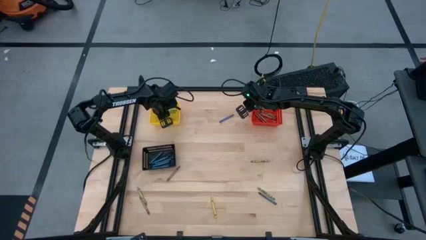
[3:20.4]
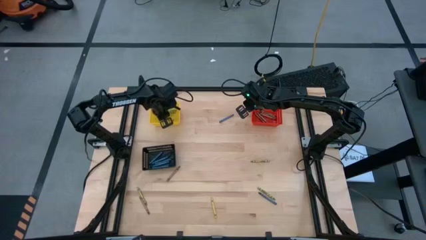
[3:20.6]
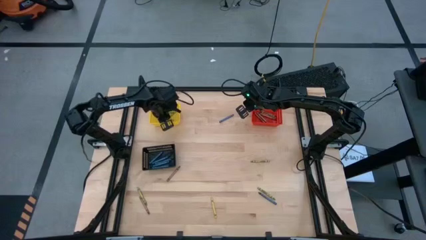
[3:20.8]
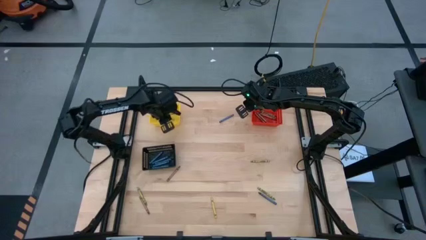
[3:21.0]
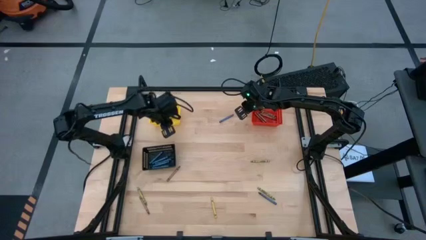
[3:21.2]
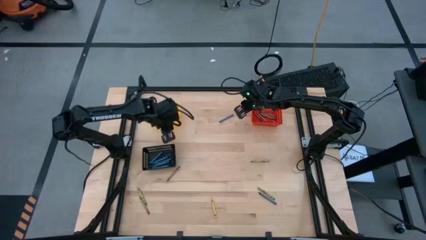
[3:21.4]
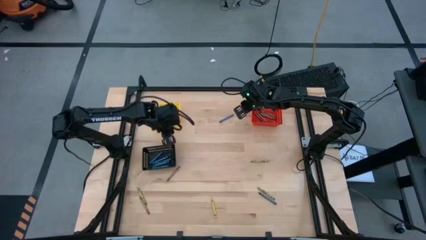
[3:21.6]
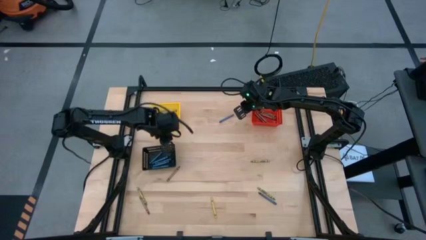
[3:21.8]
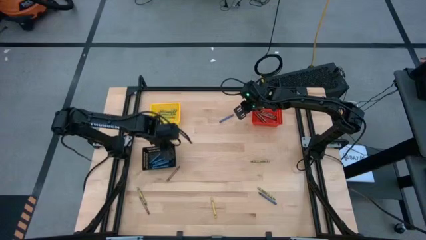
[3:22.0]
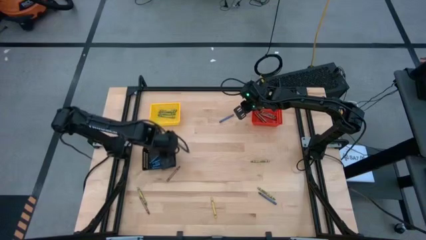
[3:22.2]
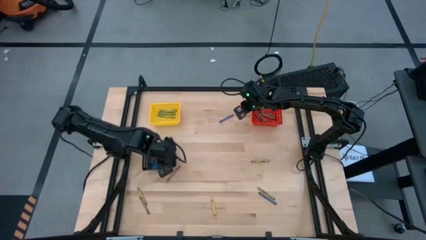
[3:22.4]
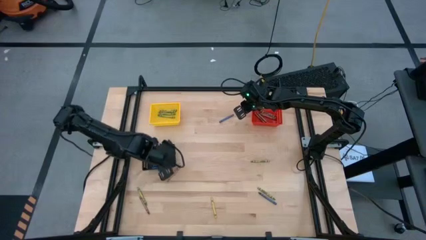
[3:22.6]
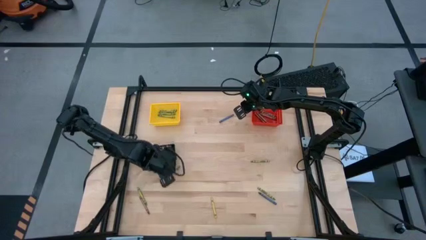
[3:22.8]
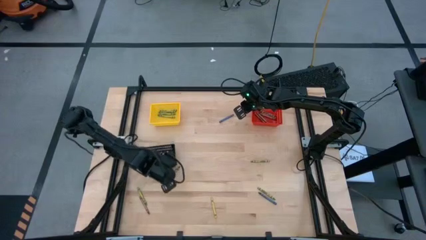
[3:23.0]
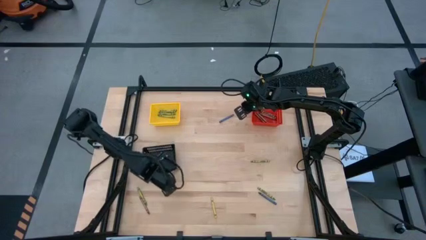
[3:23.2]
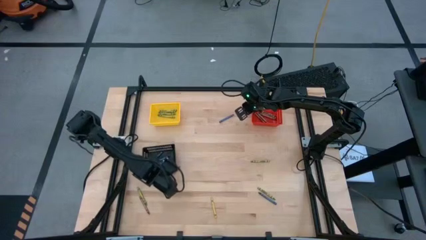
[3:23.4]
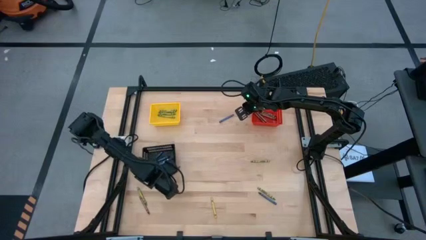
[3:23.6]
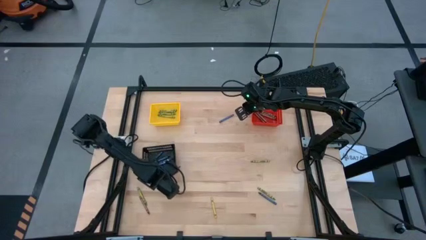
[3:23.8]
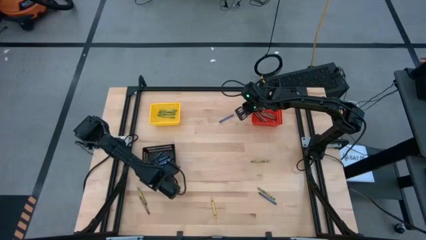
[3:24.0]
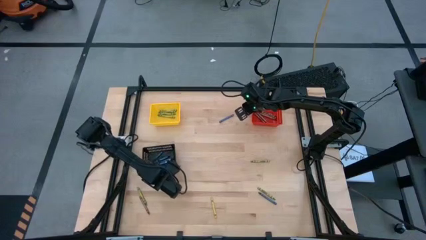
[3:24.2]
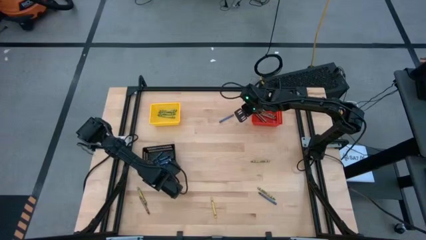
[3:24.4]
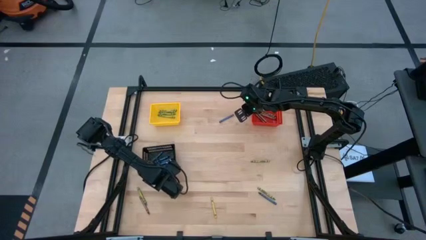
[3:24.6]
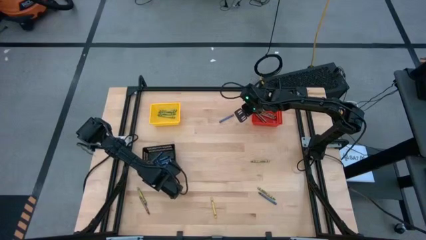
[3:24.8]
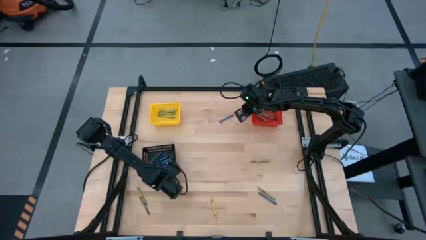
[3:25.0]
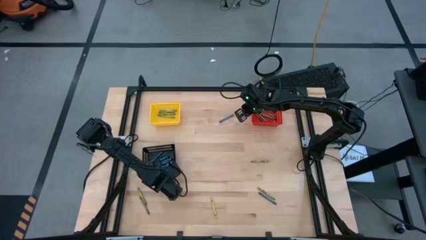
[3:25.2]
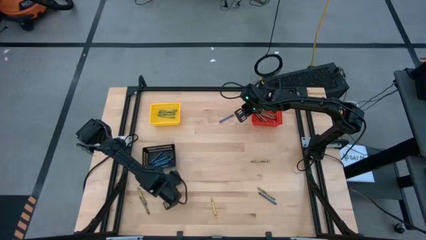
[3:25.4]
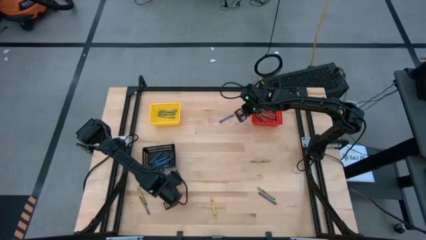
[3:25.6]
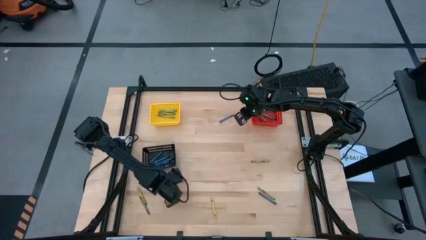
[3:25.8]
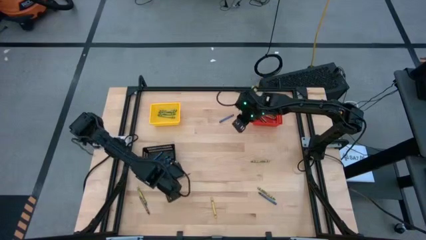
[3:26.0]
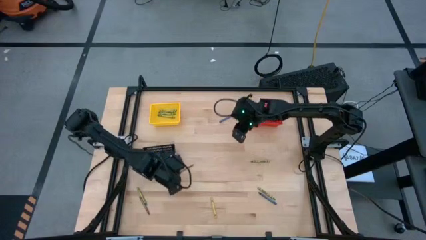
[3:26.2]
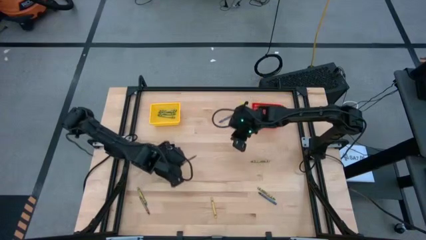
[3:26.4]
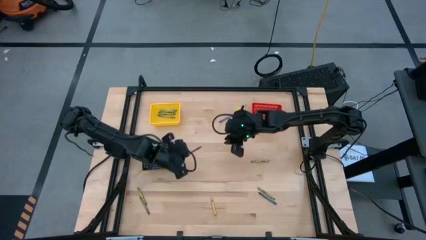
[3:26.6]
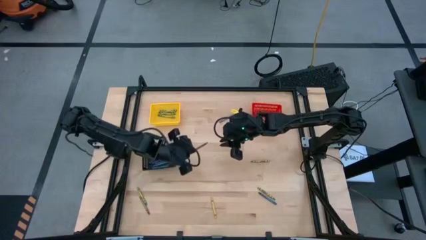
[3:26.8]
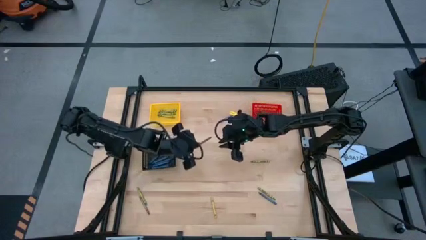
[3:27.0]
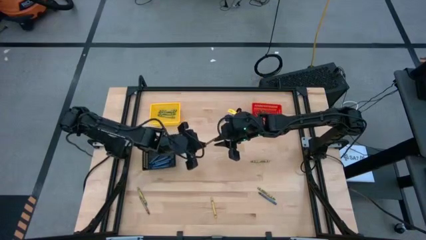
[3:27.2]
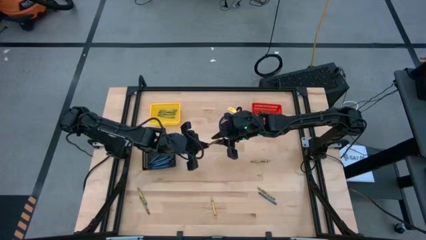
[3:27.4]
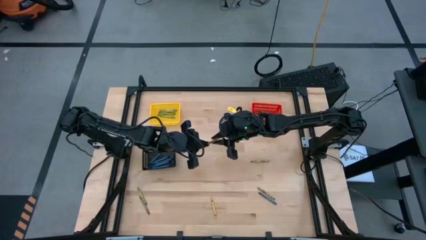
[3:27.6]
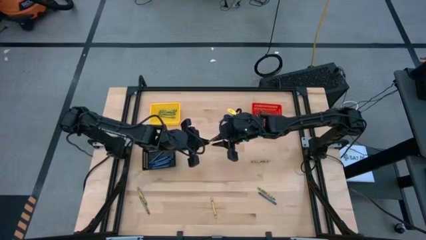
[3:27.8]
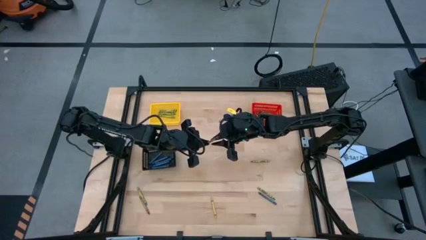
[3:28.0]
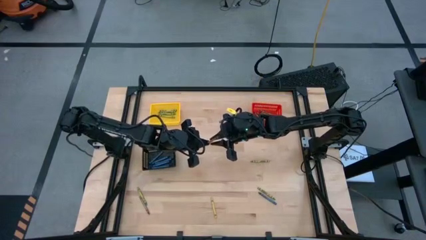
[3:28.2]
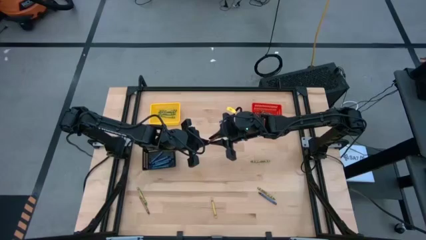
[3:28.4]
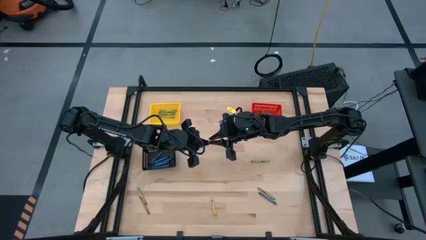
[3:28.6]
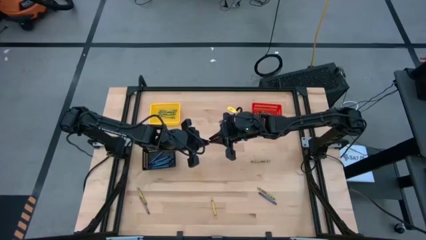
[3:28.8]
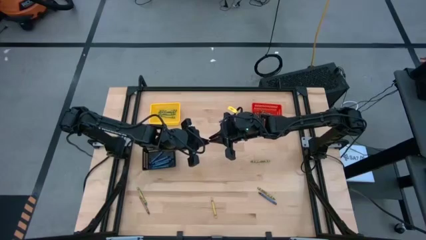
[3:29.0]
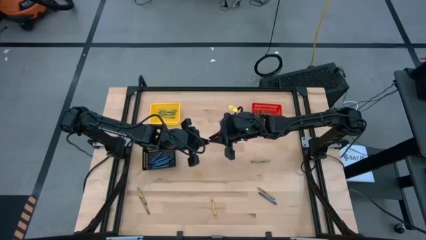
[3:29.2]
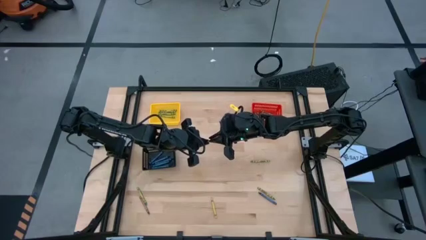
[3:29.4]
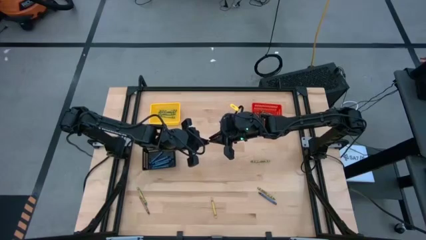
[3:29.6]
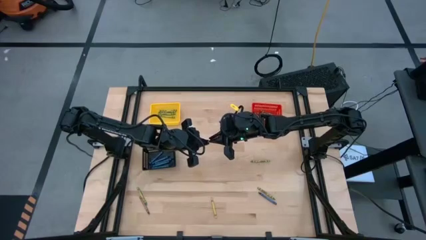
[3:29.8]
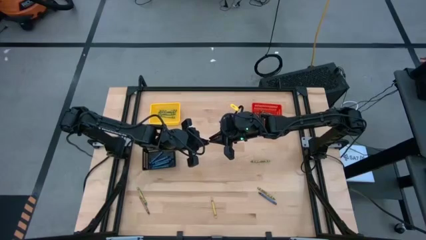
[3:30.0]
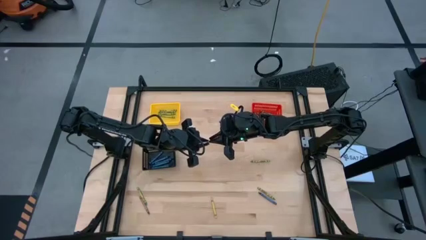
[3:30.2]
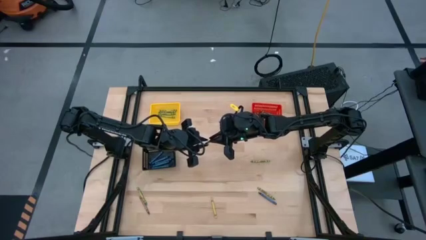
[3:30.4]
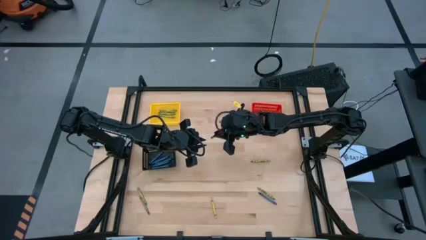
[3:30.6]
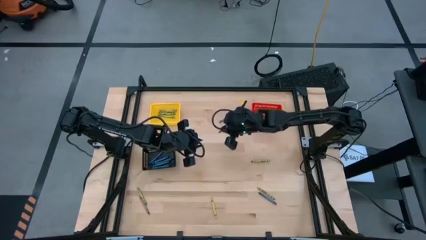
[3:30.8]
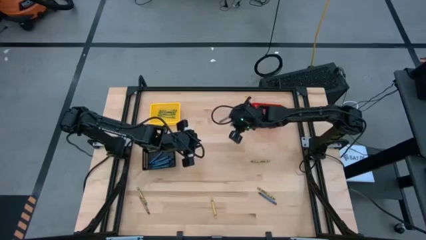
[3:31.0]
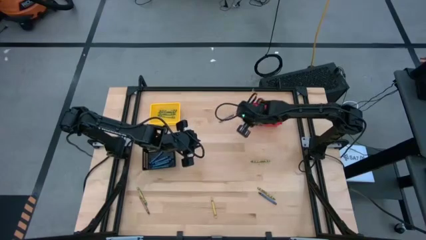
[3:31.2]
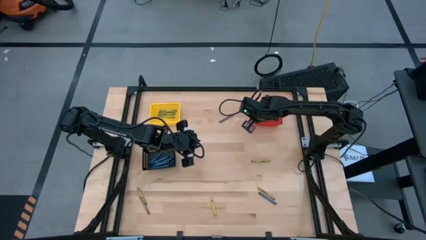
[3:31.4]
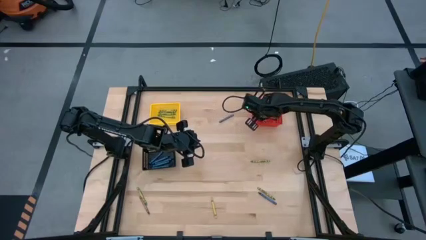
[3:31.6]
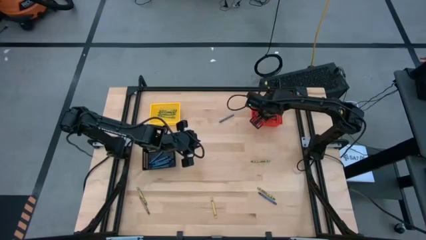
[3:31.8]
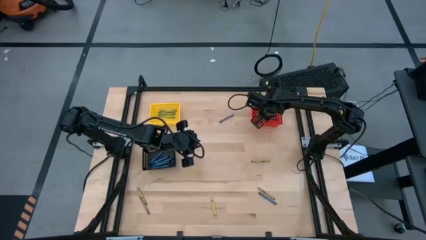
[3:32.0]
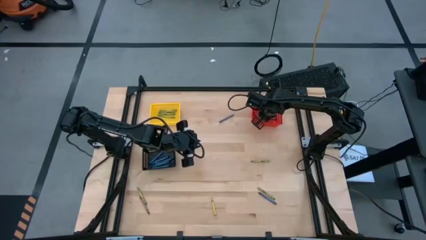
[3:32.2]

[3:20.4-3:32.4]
Task: Sort crayons
Put the brown crayon into the red bin

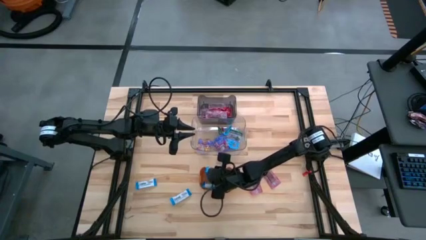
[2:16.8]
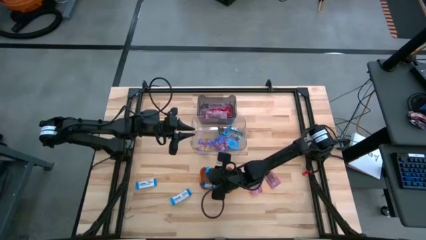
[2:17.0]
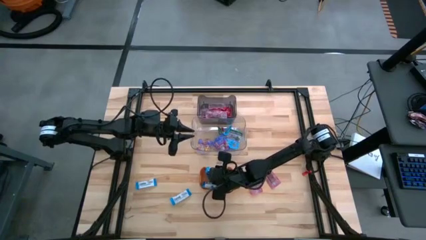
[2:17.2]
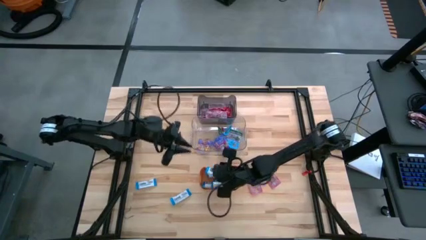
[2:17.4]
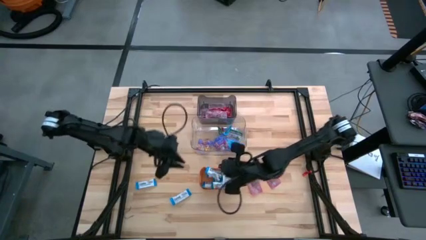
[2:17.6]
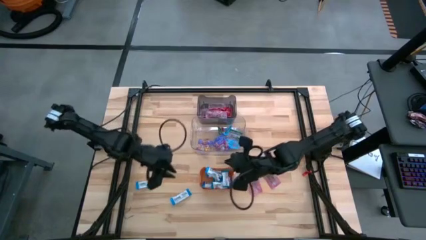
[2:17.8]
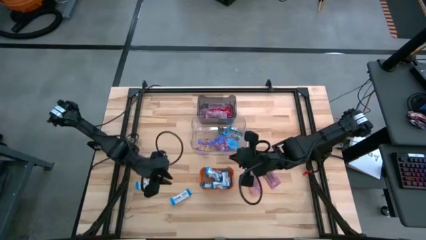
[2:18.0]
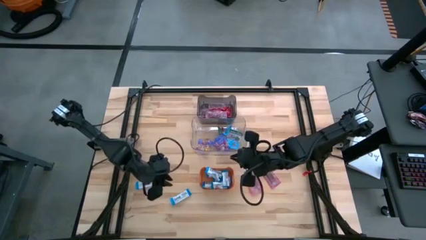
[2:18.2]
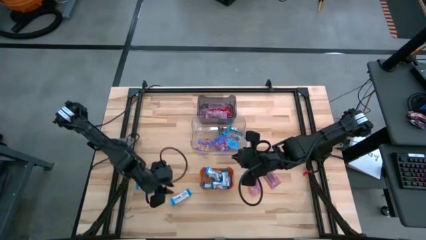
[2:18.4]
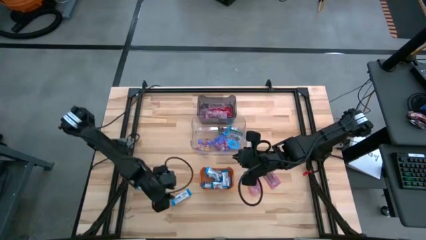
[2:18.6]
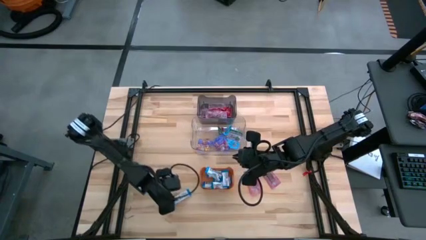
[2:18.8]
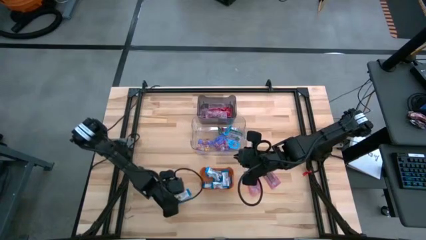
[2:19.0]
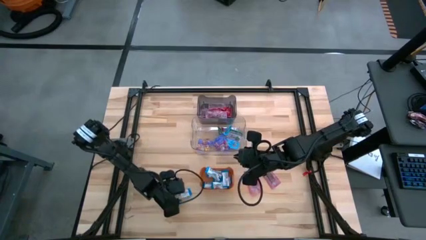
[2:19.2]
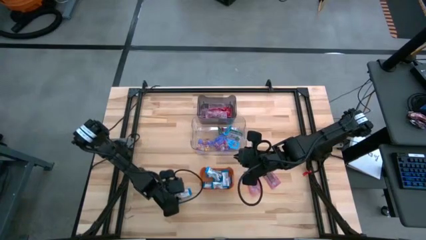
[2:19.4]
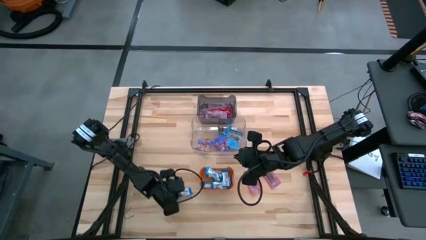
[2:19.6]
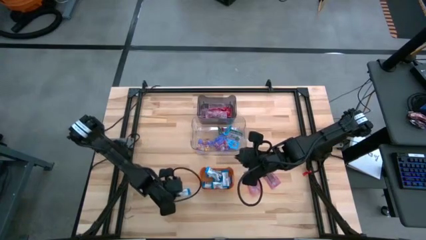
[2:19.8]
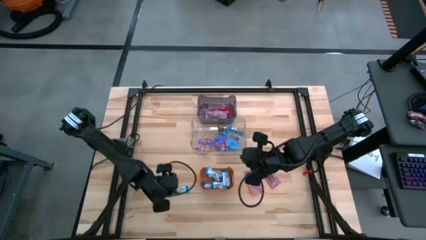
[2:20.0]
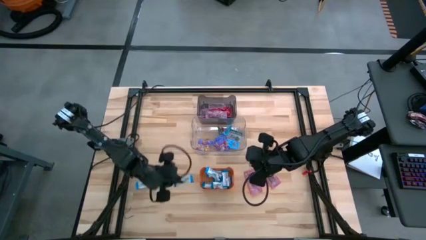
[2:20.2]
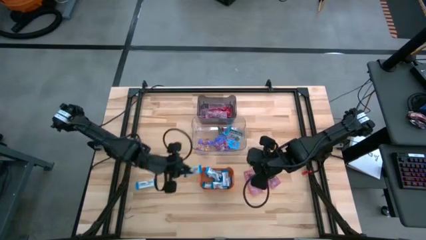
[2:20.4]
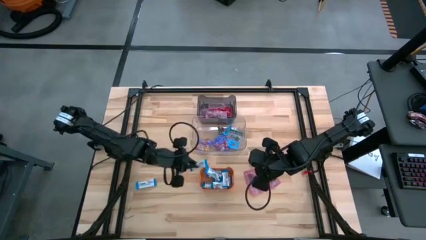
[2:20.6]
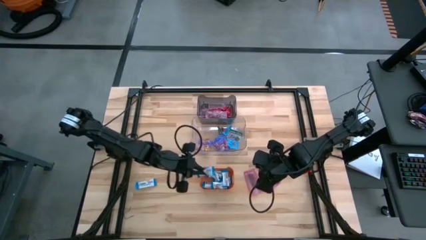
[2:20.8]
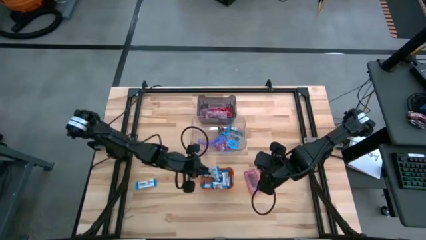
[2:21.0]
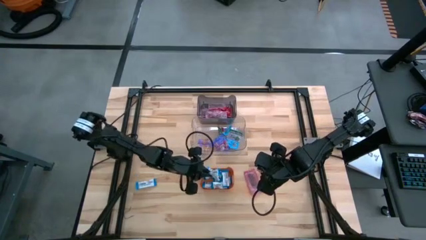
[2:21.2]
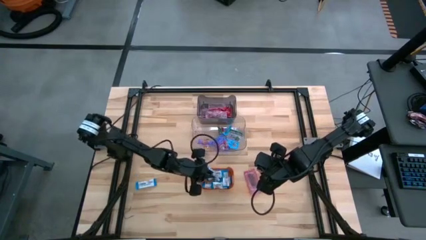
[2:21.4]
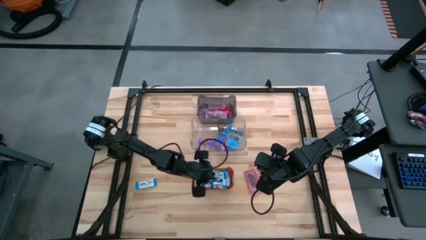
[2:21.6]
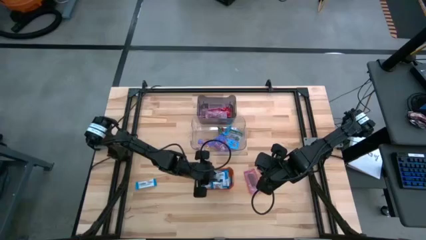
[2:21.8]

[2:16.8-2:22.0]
Task: Sort candy
Put the white chocolate bar into the orange bin
